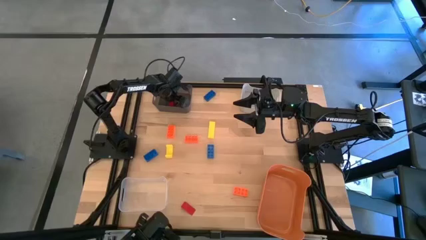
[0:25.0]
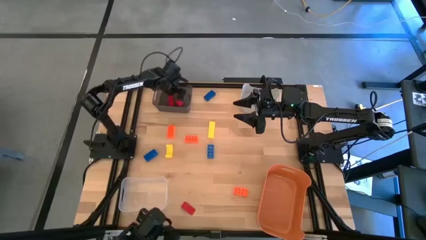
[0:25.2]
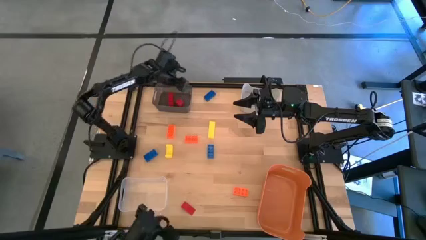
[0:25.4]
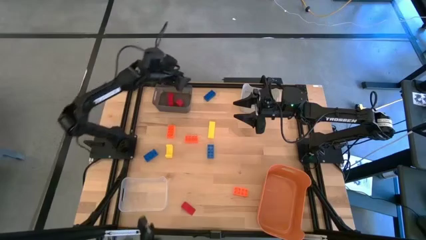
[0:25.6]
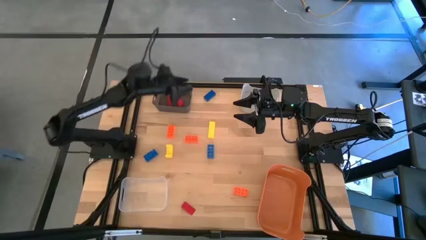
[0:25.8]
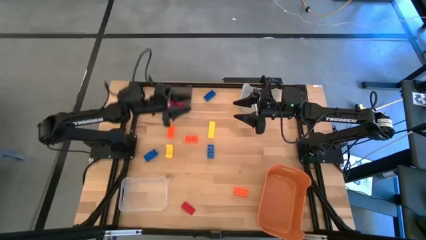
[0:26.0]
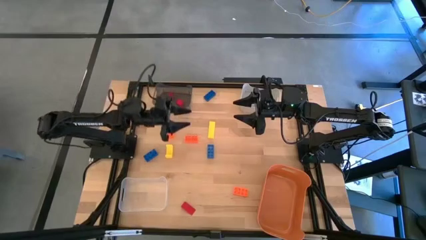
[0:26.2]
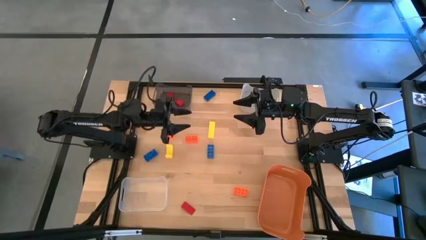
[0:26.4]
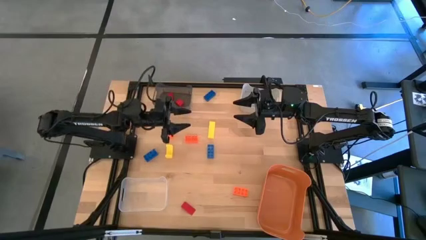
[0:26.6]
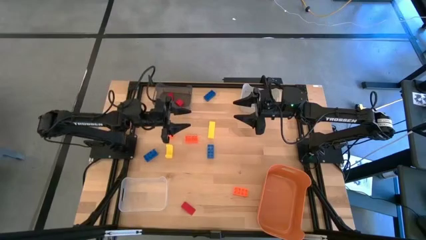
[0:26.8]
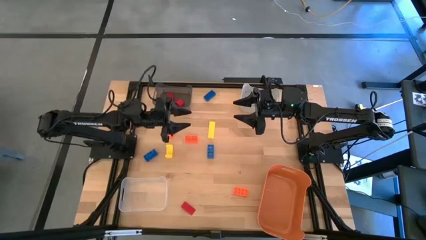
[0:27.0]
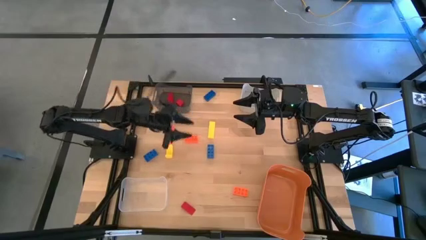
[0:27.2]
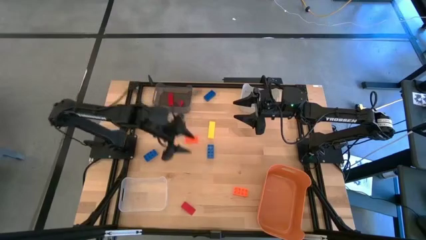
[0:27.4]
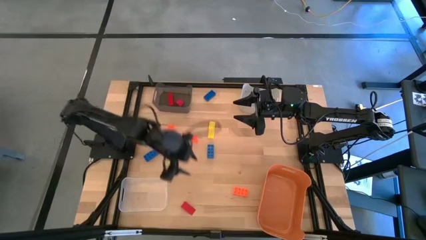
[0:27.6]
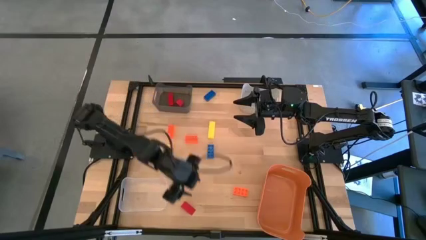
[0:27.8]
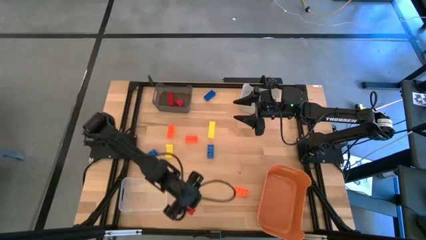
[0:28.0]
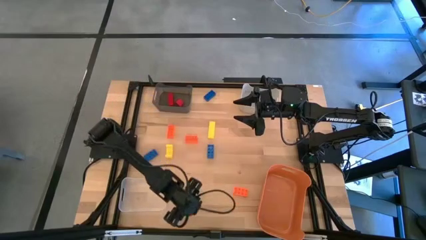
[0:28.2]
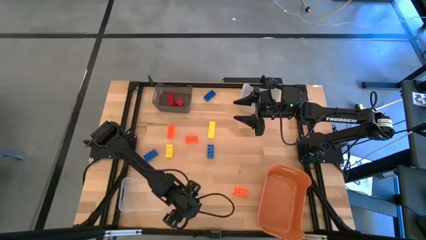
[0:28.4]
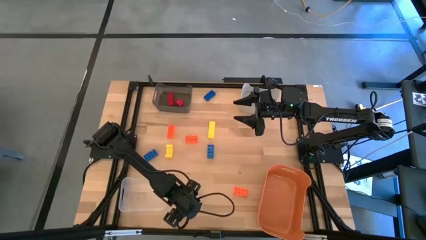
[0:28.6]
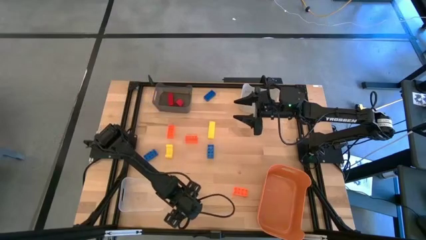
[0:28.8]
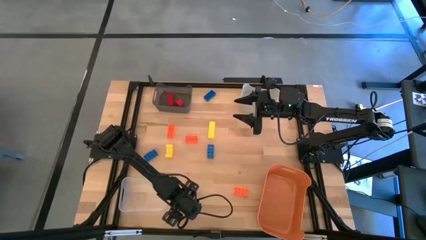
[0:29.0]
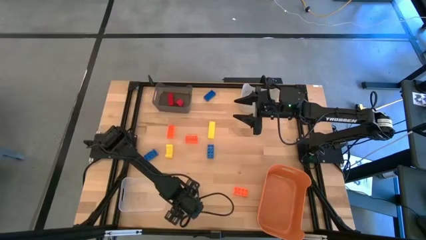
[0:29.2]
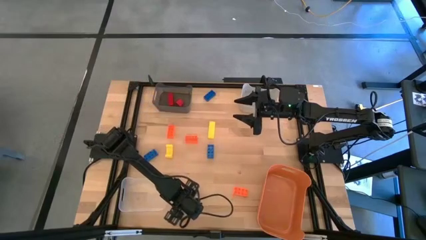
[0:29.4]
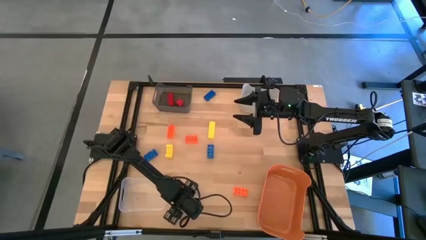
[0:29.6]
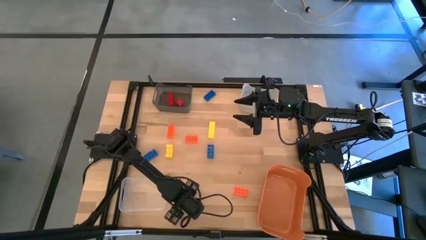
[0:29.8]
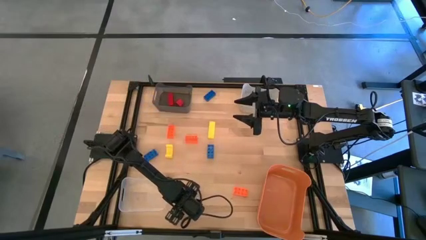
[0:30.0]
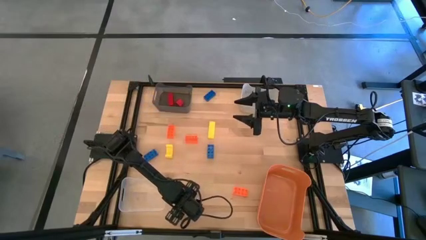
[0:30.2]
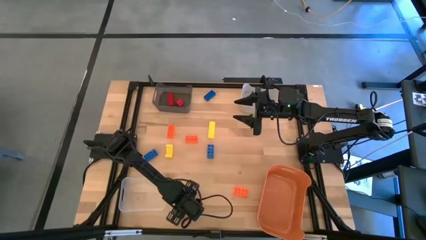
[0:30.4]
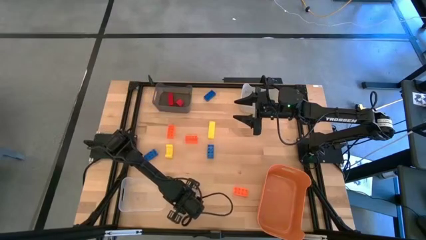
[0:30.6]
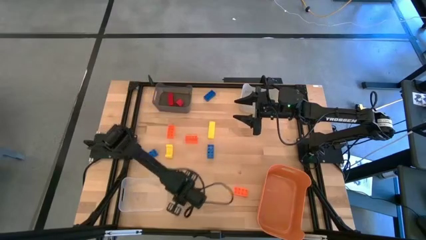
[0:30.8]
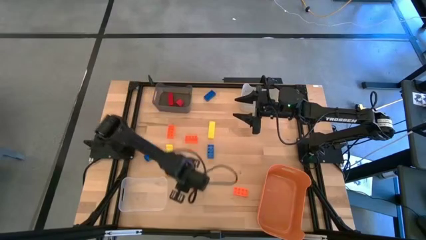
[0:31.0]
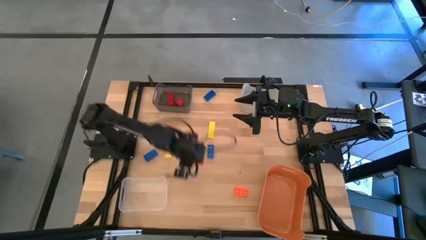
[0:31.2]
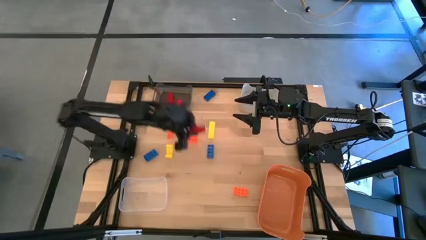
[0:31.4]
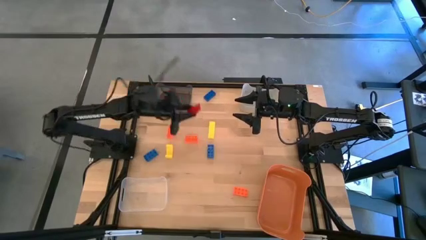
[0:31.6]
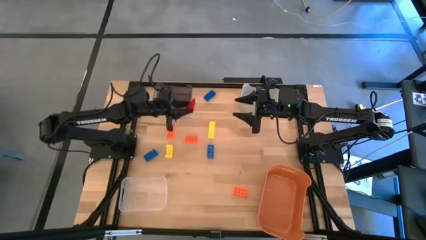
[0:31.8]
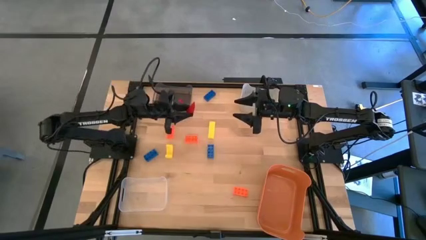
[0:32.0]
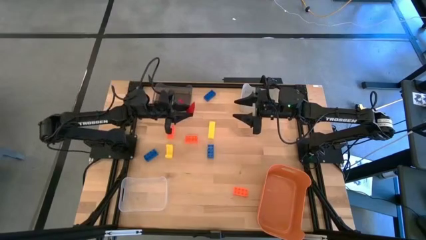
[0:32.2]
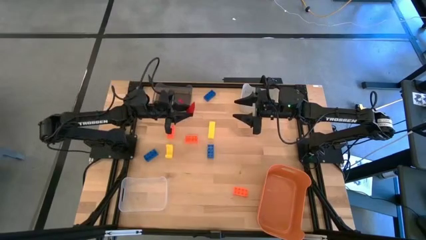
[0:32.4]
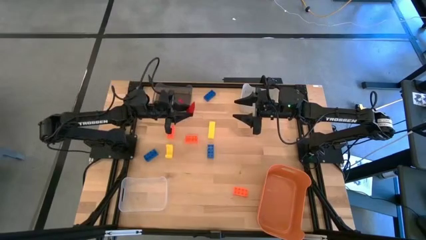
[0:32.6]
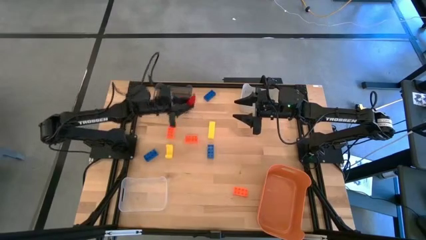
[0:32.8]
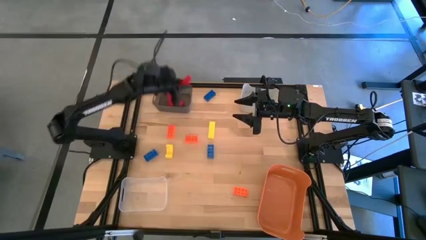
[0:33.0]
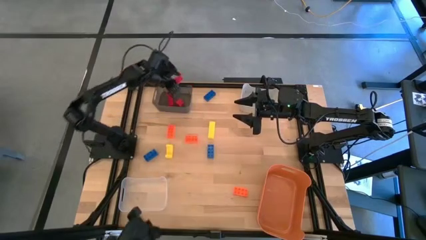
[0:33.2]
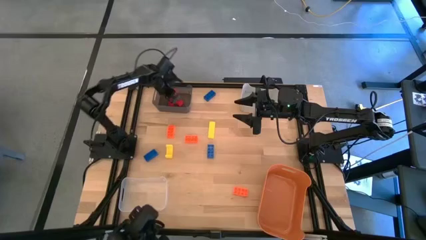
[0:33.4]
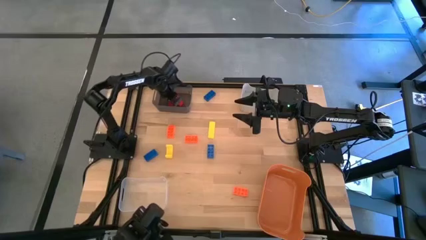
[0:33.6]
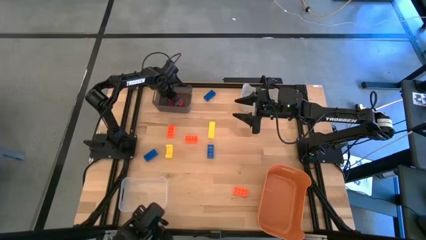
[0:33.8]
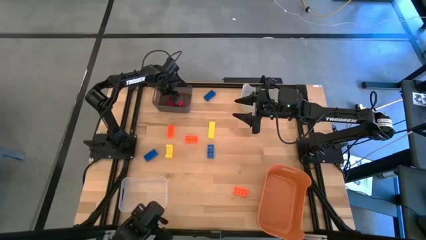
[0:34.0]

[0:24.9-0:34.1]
Task: Sort & place blocks by color
Put the red block into the black bin

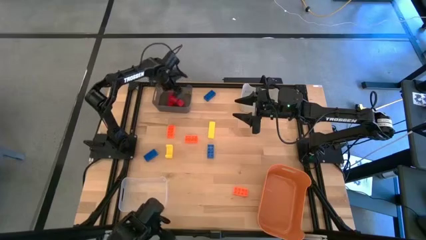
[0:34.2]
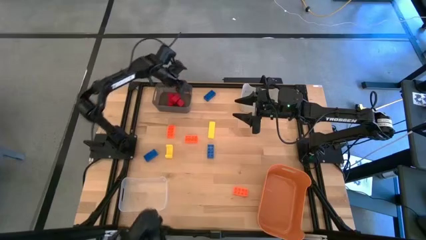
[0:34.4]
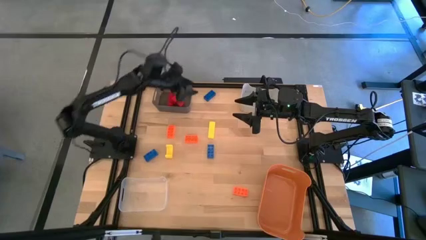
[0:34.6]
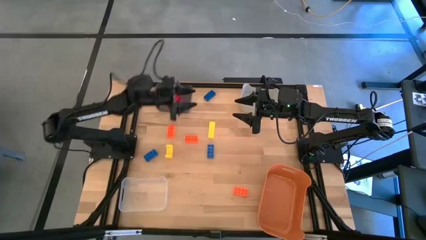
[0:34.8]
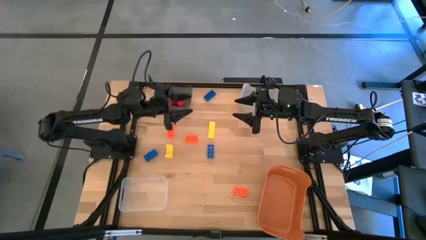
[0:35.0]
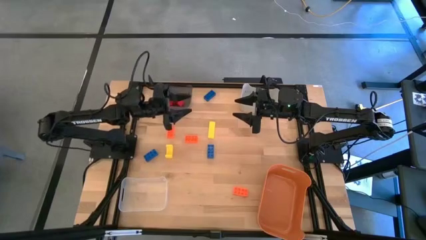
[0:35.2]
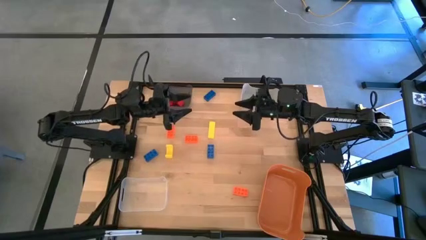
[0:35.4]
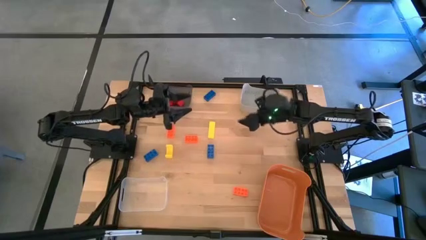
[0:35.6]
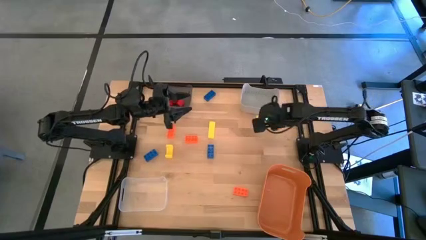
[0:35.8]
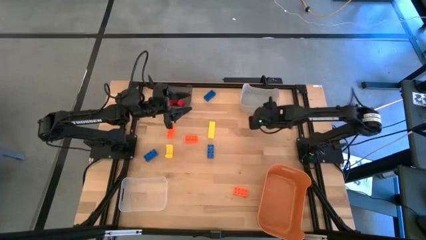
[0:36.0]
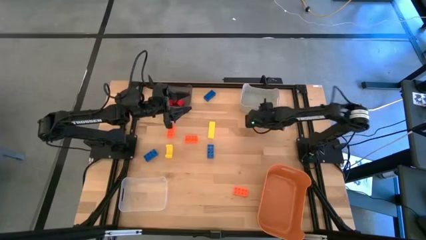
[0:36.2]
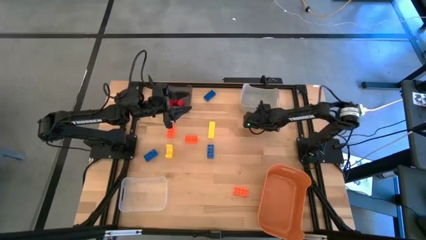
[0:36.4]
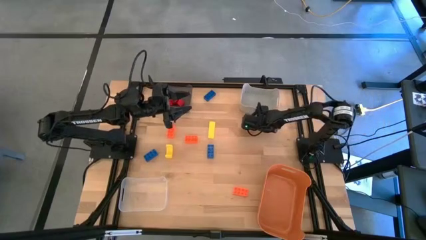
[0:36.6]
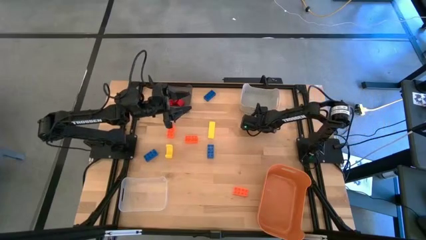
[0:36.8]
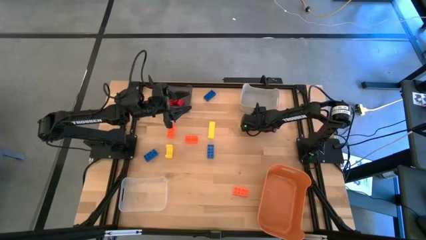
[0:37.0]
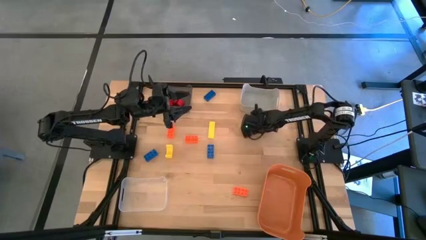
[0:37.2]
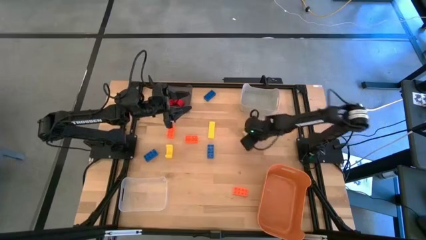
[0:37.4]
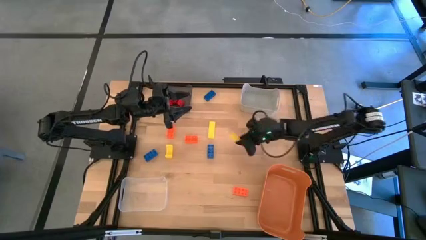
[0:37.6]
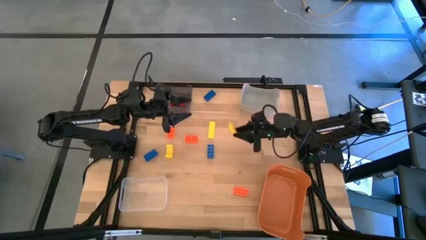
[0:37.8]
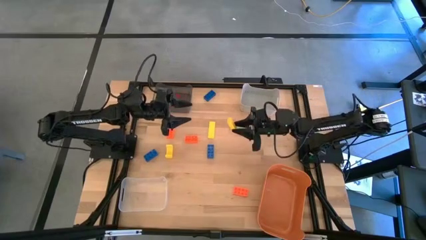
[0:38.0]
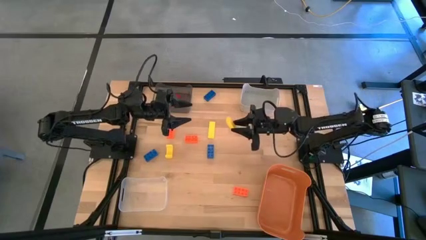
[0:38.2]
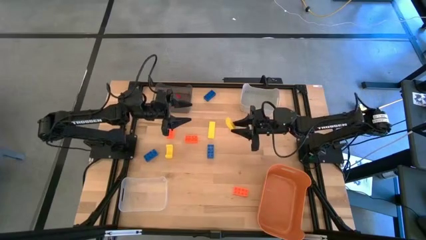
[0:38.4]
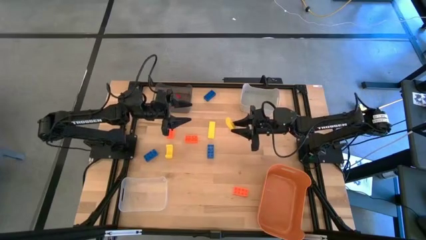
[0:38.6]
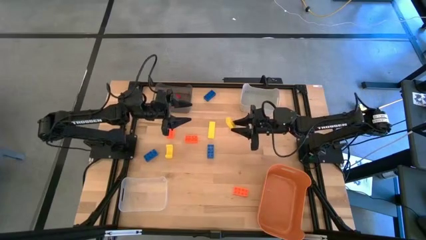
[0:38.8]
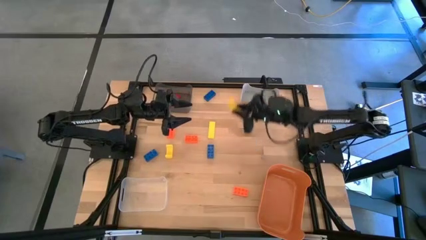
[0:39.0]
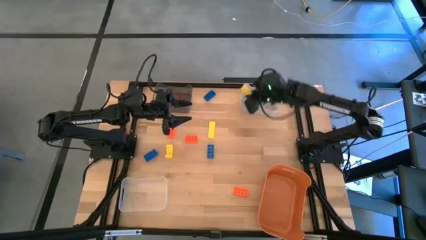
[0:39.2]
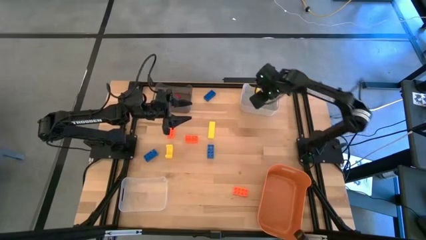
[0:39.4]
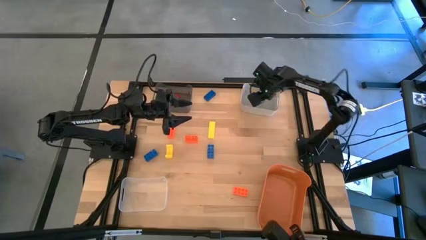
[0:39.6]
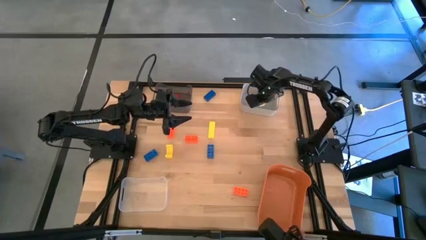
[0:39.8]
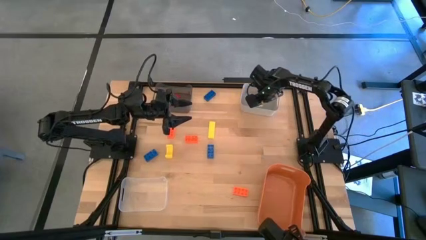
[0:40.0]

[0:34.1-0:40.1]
Put the top right yellow block into the gray bin
